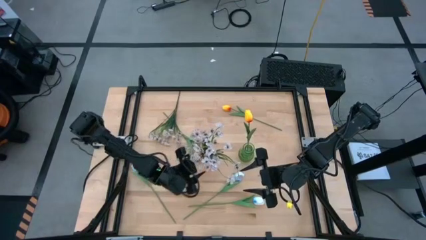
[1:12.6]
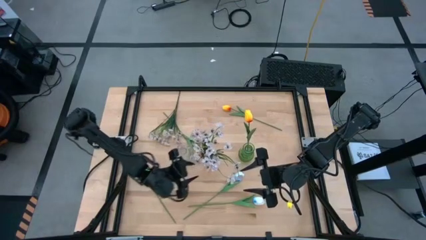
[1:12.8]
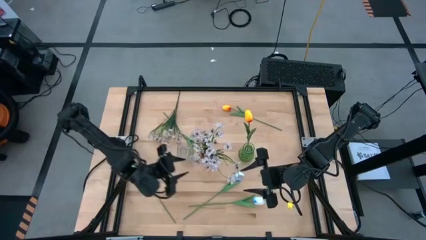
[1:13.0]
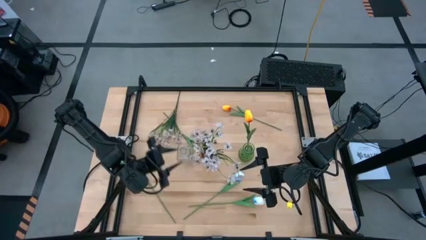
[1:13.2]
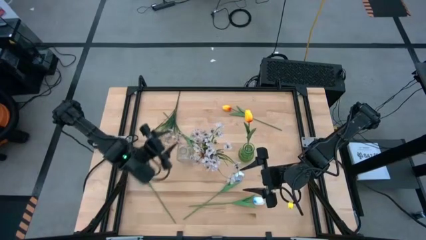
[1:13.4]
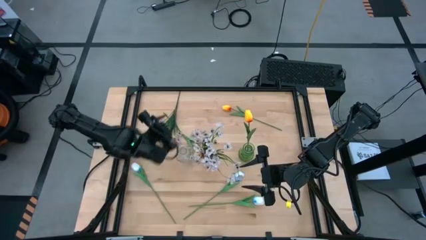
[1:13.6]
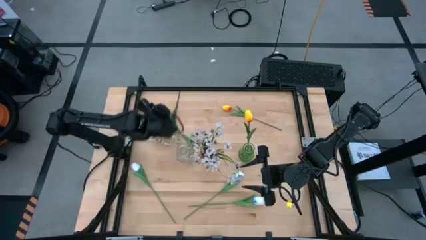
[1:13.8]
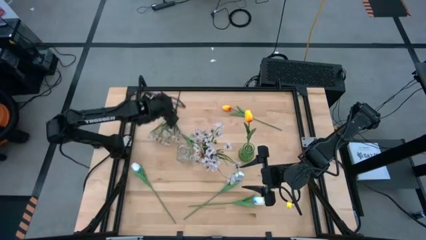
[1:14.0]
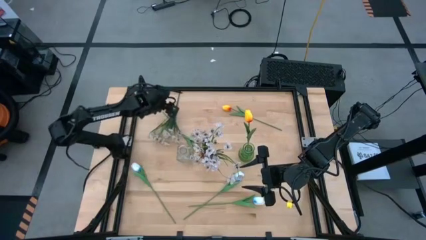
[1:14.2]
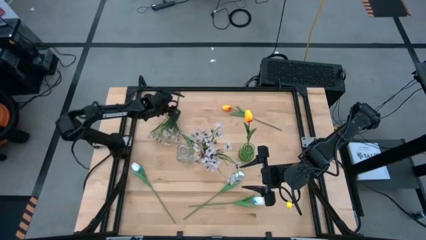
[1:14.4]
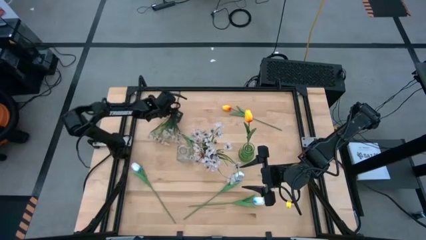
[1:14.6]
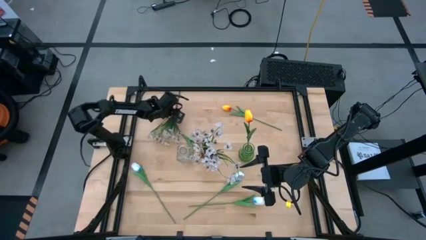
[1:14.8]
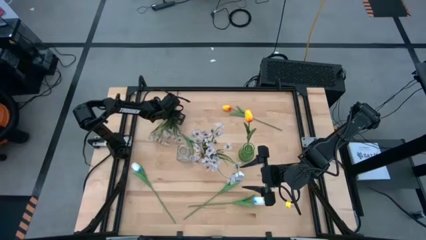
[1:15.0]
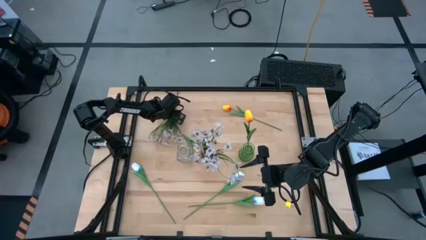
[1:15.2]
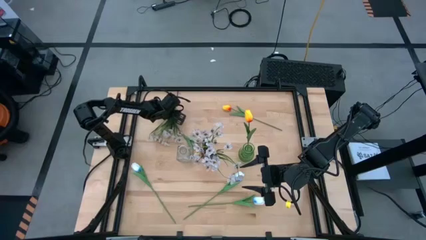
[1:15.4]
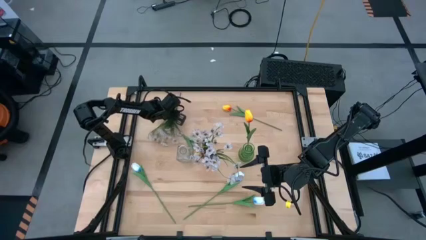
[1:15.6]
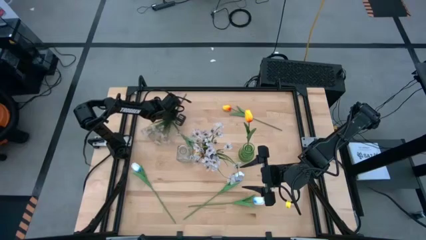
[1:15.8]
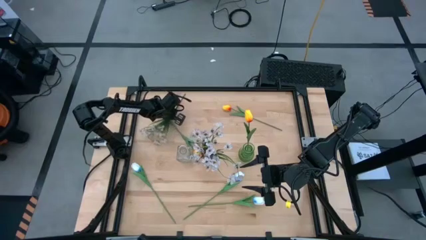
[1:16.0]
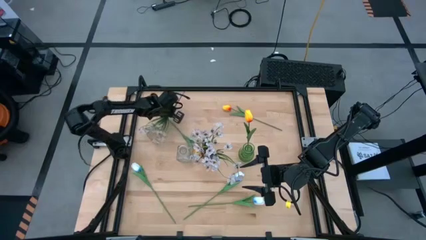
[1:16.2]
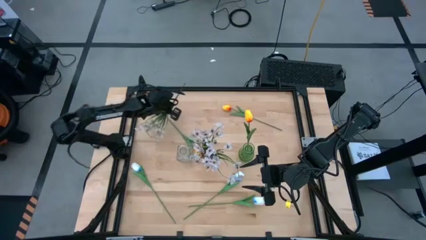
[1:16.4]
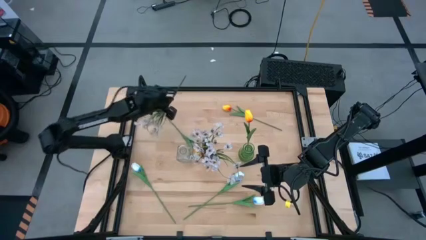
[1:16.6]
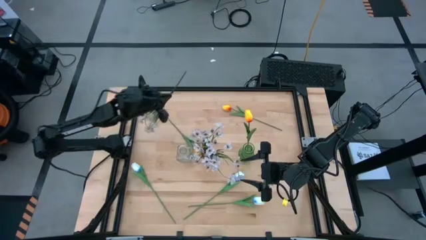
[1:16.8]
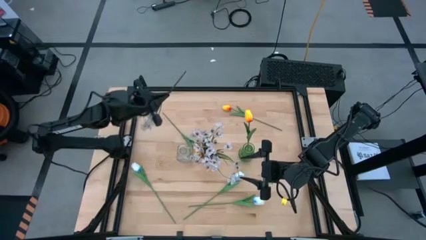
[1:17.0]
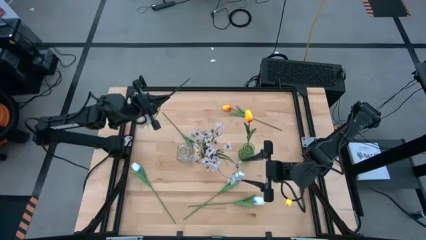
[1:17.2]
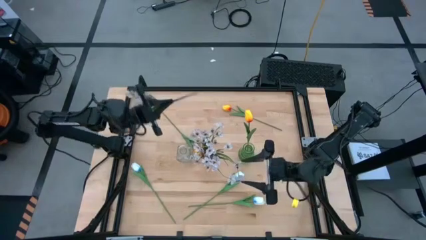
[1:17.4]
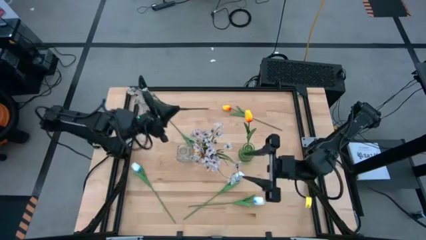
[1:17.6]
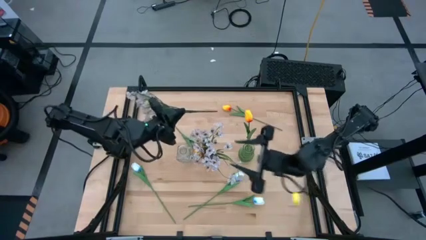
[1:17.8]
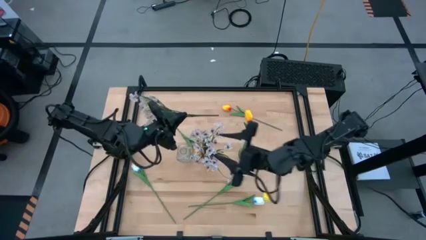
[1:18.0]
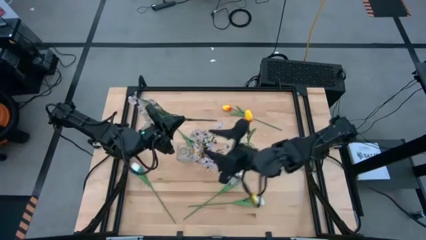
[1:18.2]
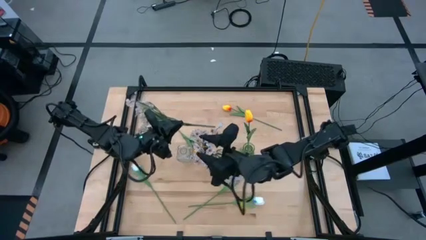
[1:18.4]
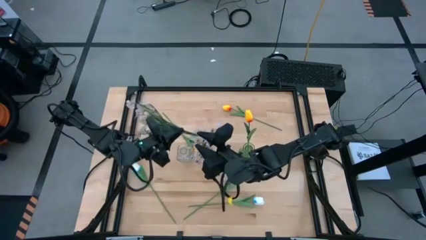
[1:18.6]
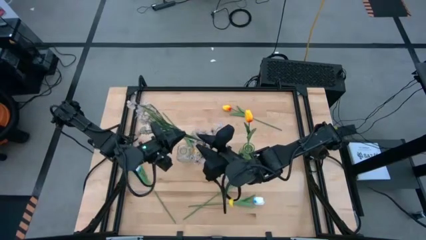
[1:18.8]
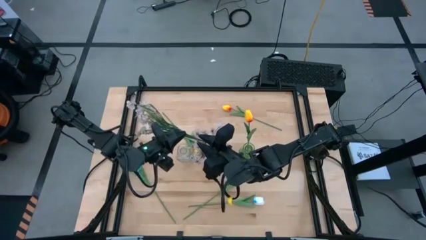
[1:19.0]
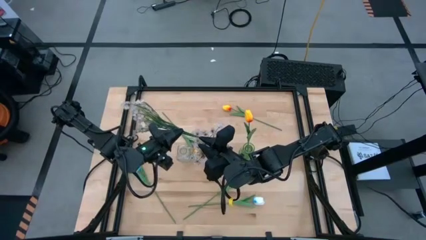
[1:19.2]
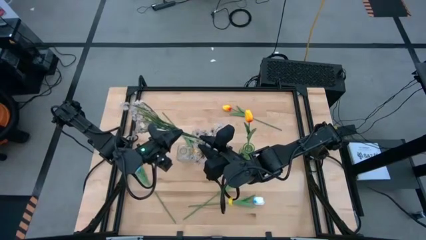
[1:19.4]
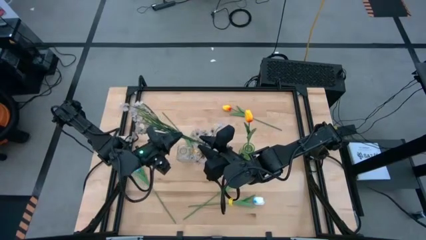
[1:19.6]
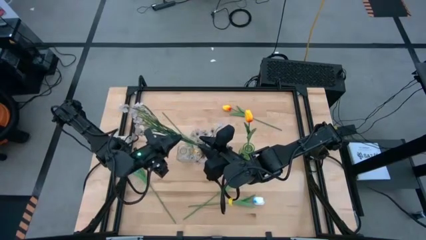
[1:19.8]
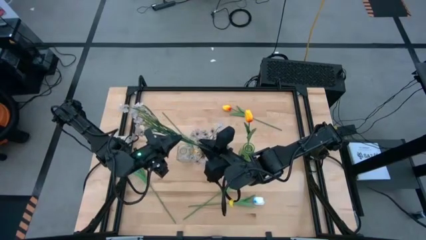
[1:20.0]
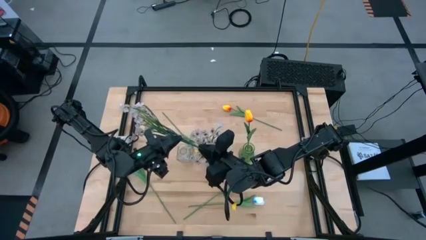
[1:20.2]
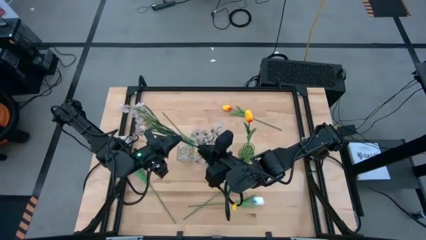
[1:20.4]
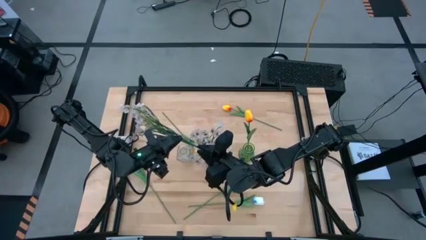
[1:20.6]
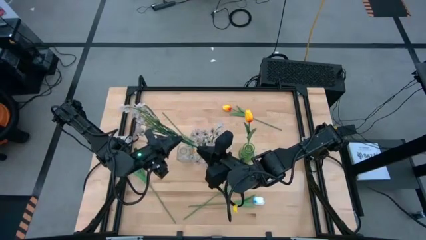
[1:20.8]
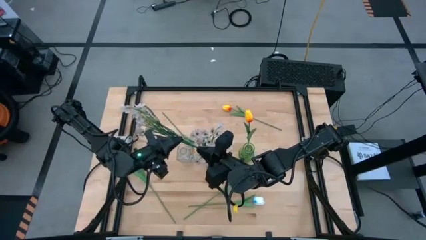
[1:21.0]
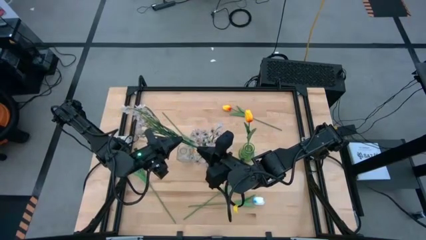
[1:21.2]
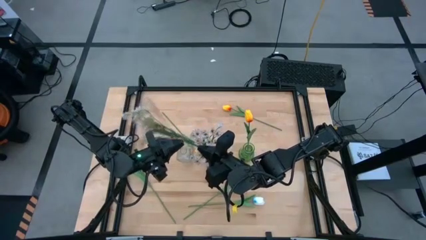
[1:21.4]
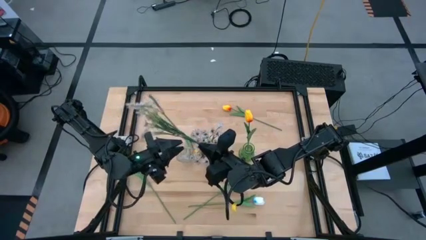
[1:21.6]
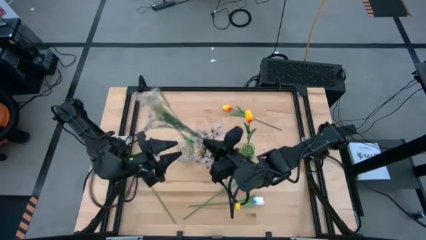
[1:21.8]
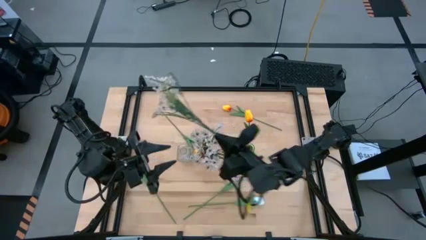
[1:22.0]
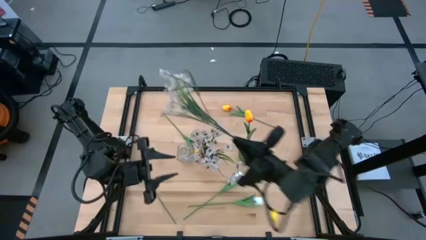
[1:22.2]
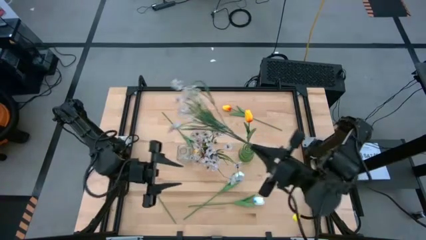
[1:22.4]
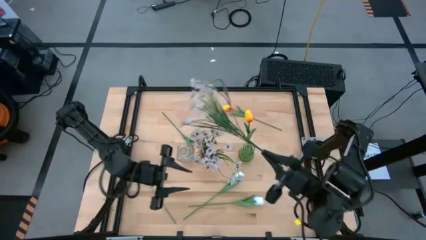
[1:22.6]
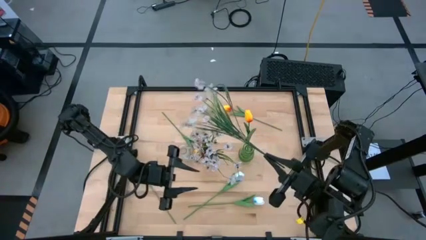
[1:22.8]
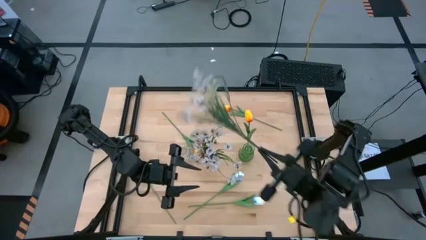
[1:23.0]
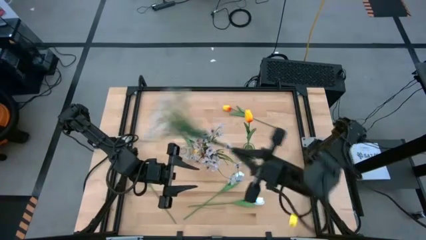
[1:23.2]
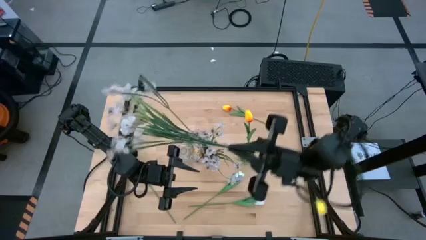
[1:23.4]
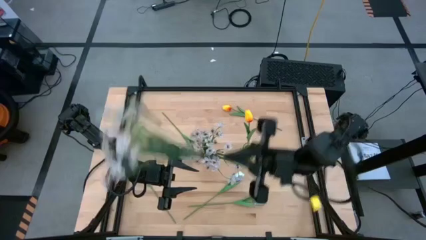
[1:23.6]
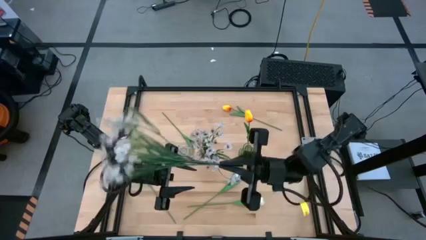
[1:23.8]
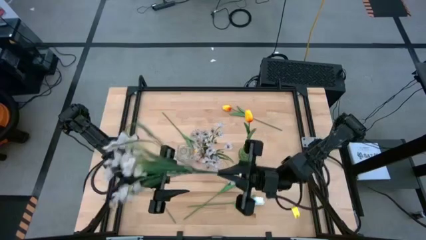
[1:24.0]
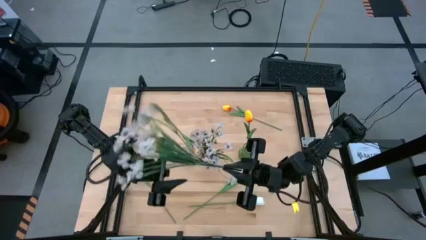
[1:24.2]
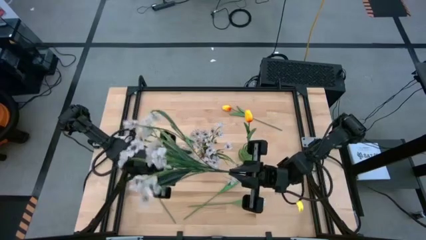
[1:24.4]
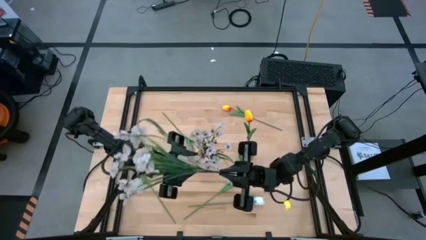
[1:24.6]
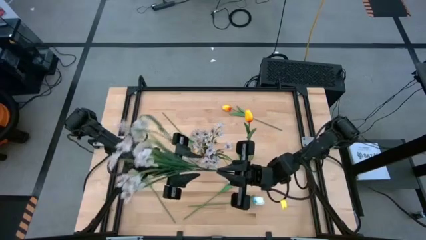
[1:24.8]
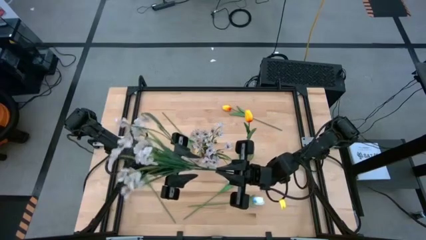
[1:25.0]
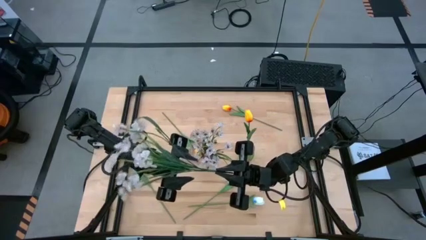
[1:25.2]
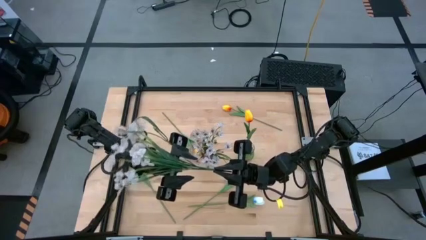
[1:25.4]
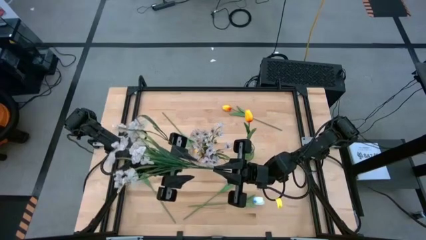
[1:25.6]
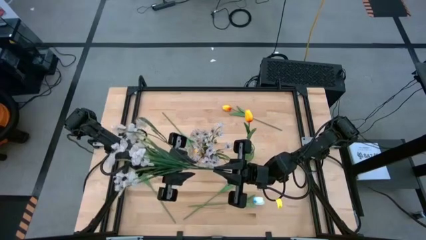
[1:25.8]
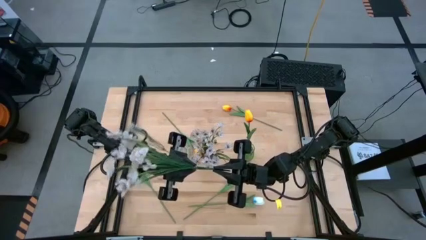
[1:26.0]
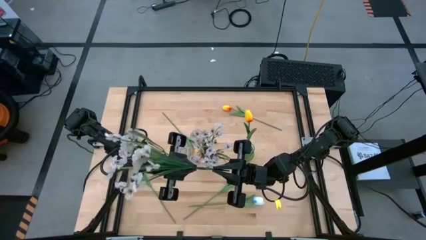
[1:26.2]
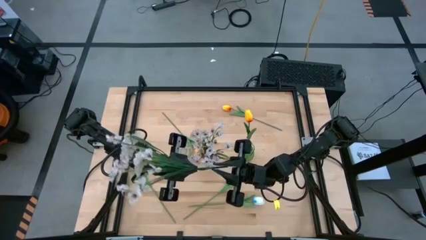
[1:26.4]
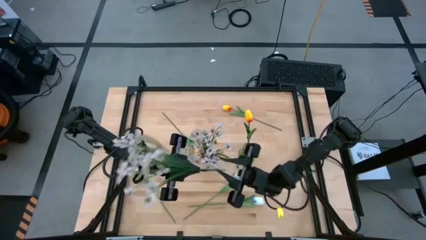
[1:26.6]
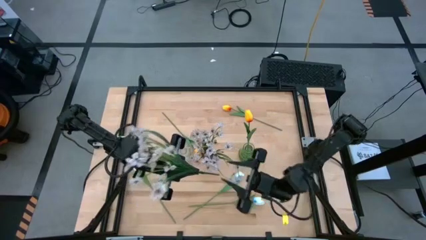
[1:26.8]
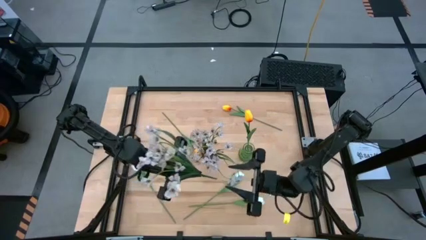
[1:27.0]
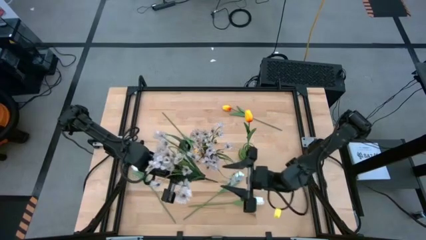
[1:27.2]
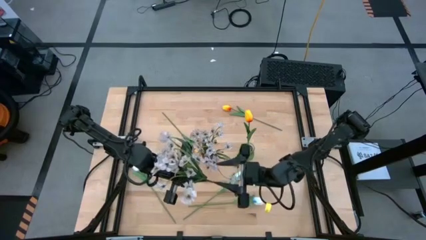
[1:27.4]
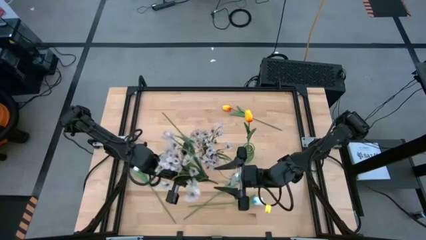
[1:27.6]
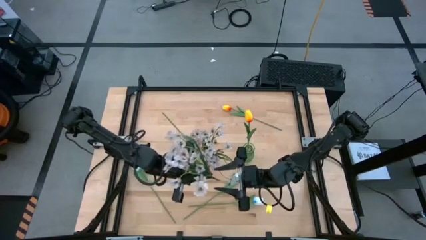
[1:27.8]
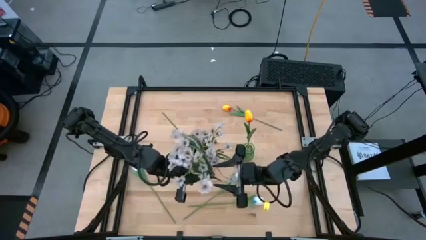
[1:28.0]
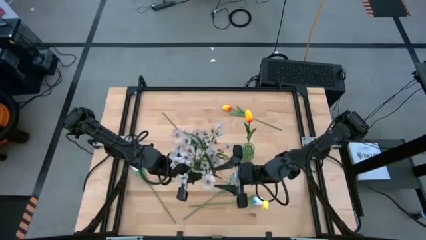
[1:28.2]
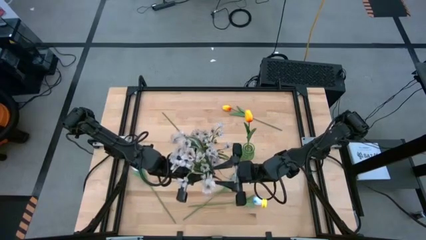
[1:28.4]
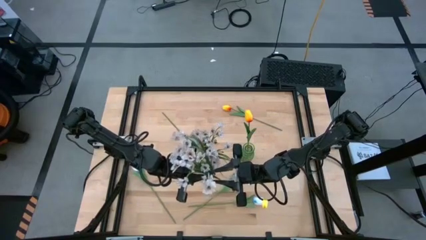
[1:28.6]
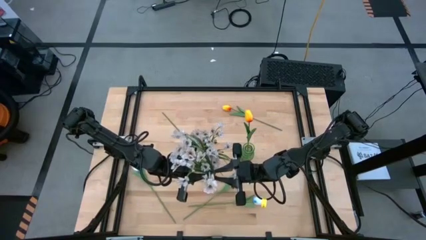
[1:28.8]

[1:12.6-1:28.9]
Task: Sort flowers into vase by color
Put the white flowers into the red vase
